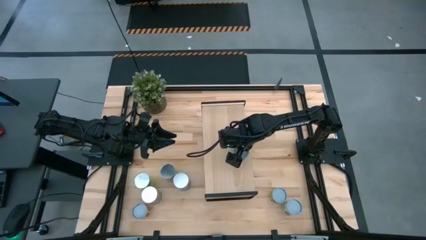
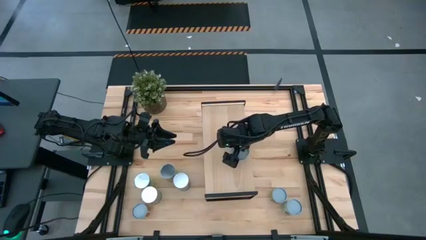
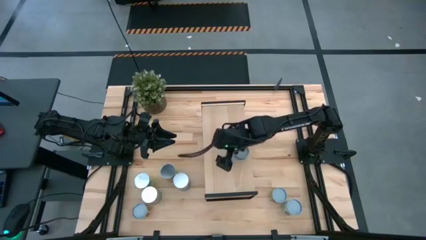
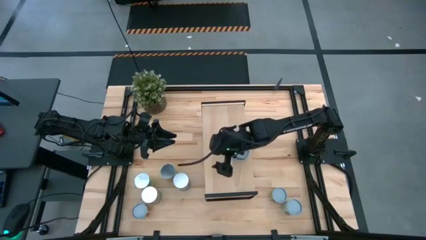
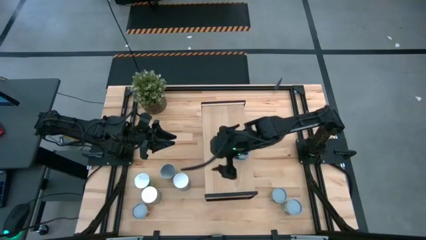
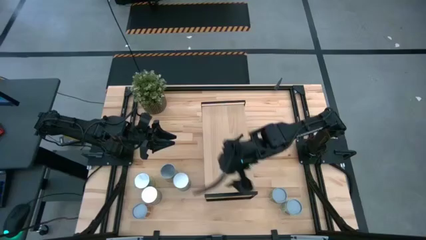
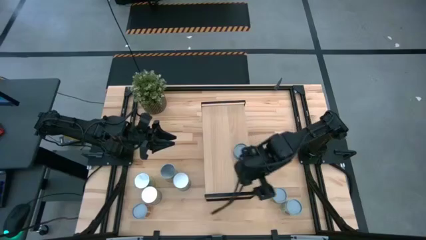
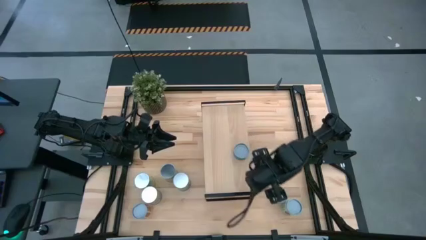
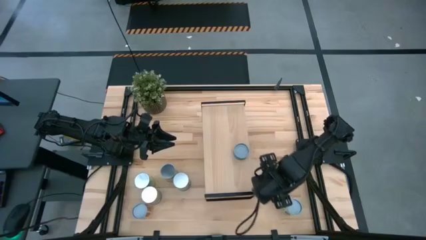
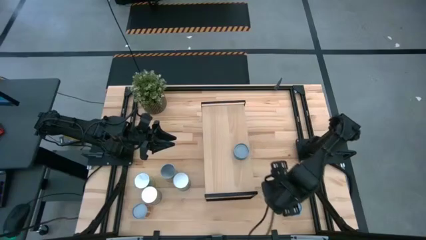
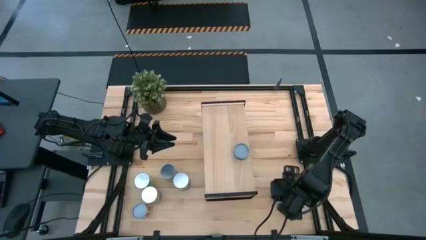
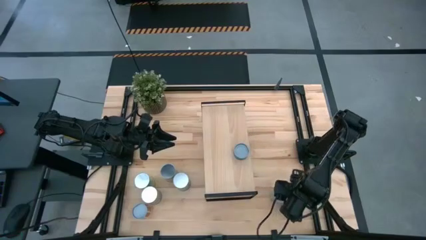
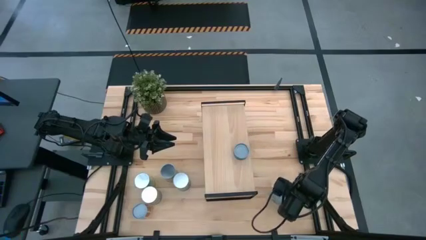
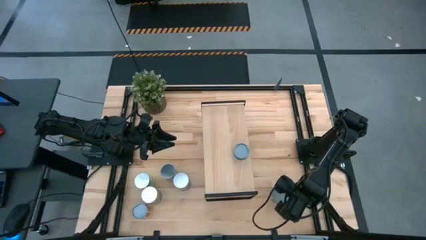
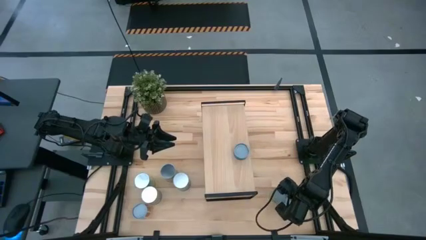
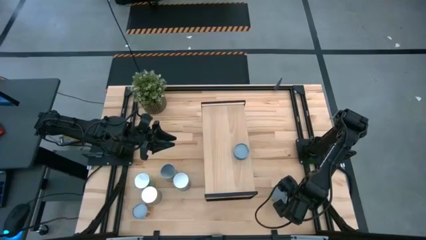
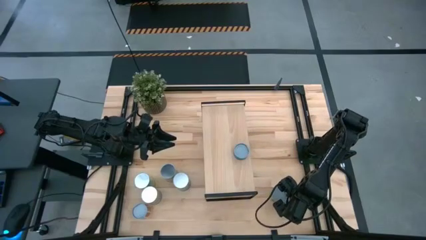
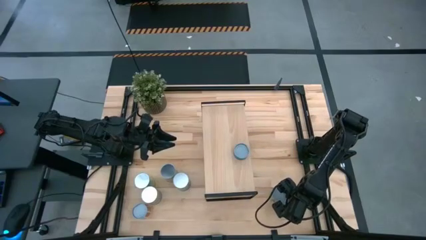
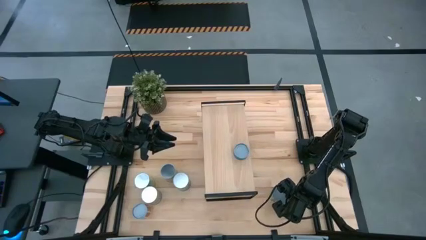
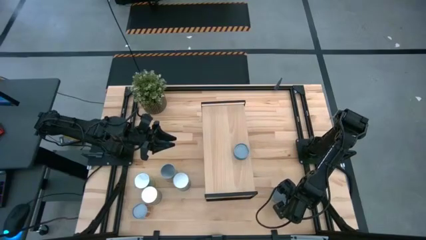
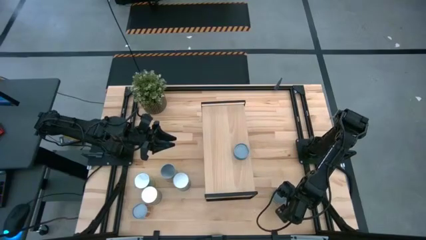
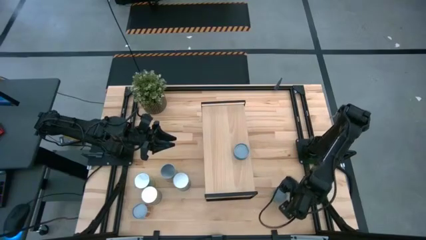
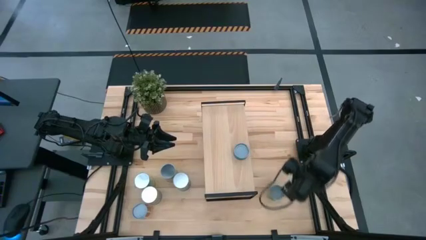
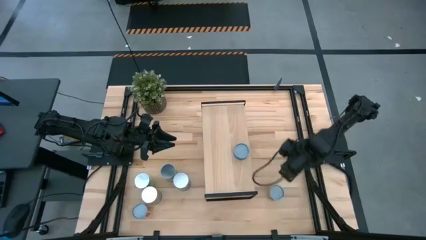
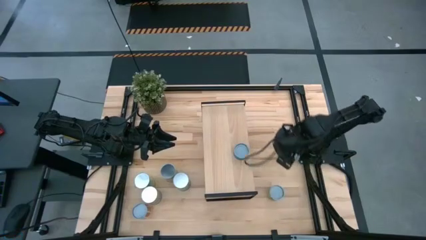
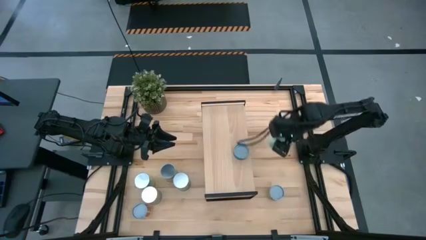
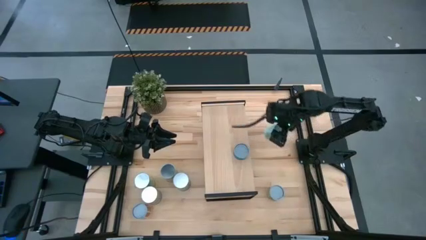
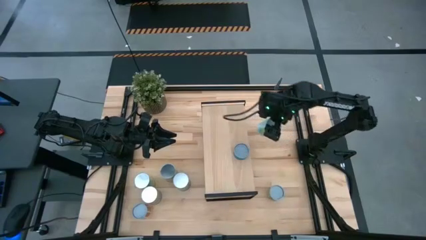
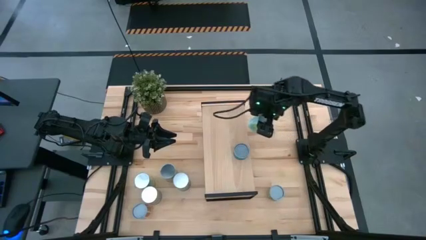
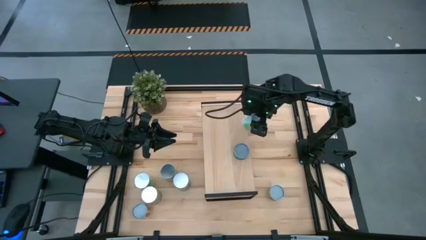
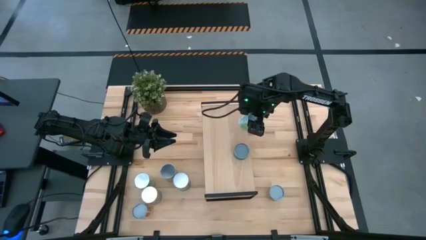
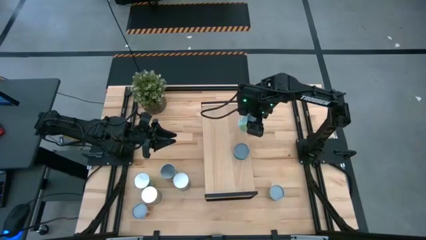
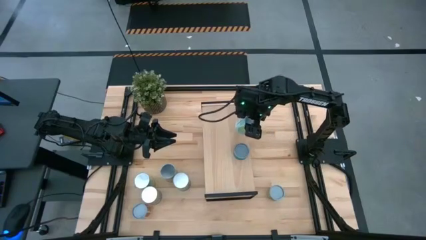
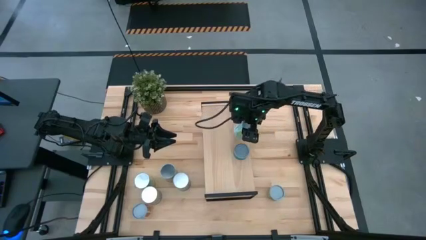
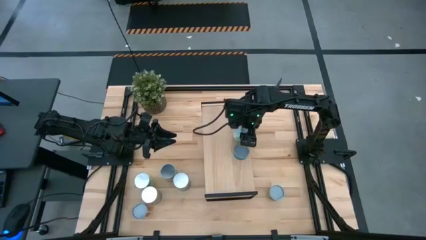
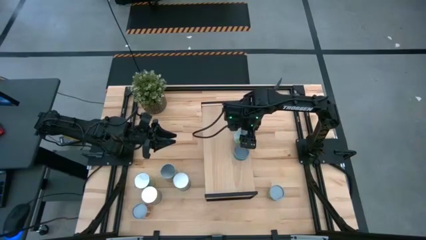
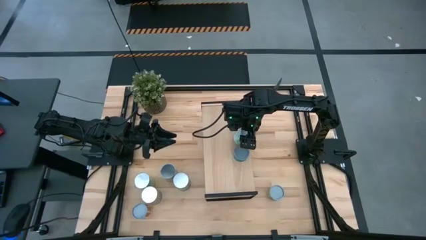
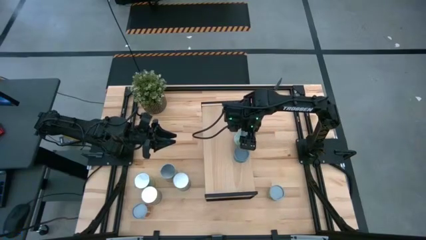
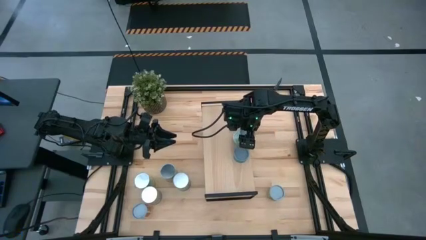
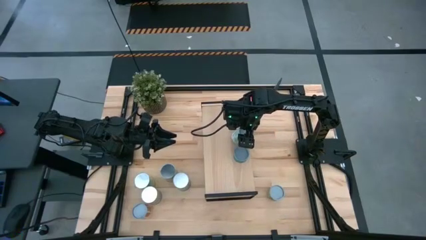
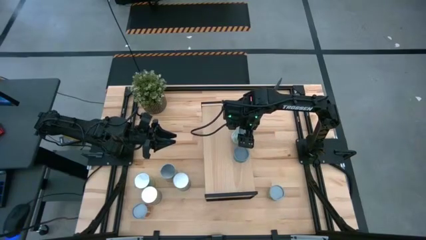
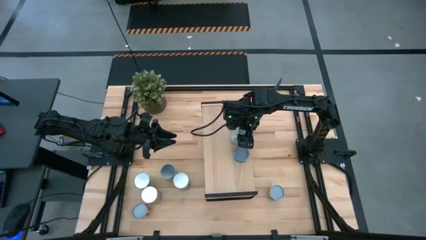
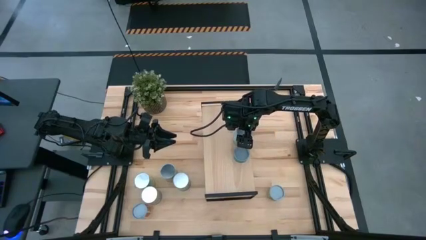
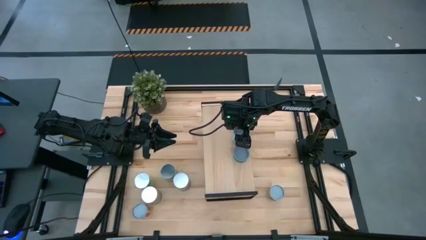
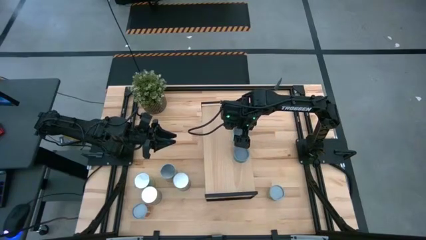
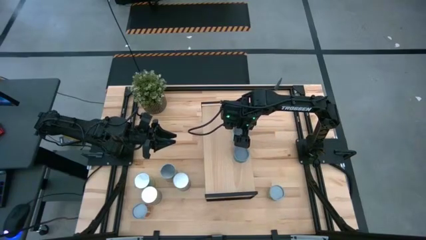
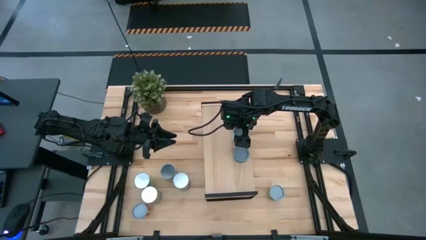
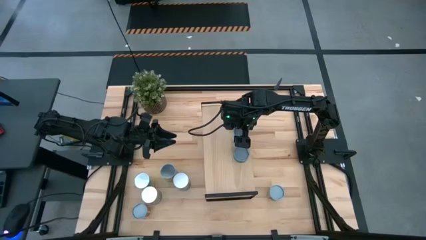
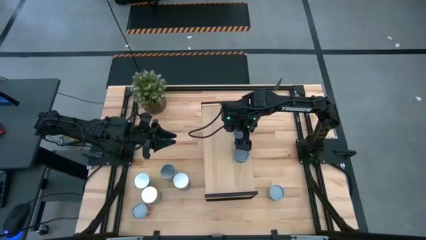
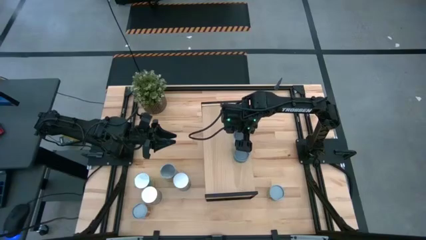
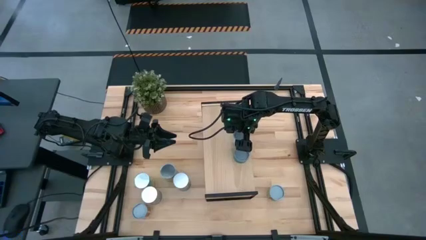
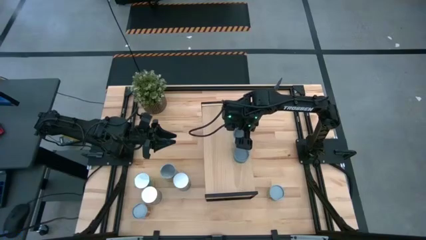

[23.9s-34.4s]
Task: Pick and place cans onto a shelf
Put the canned mixed vegetables on the shelf
